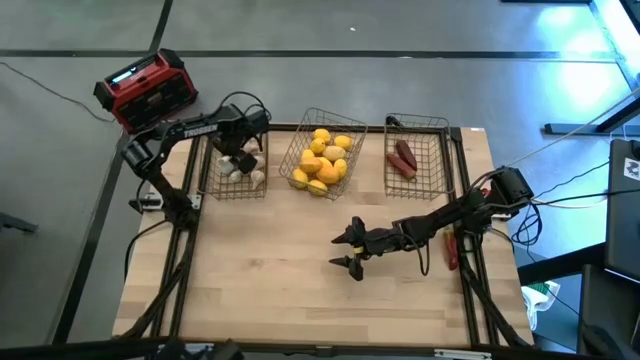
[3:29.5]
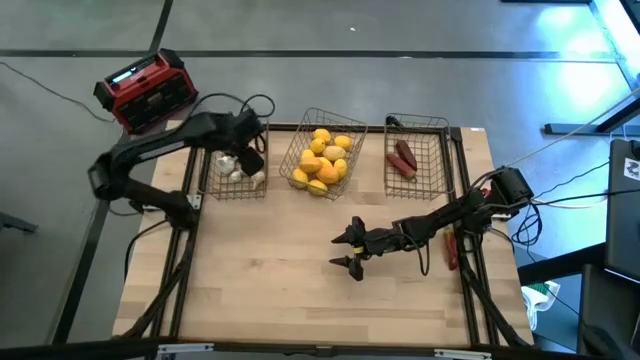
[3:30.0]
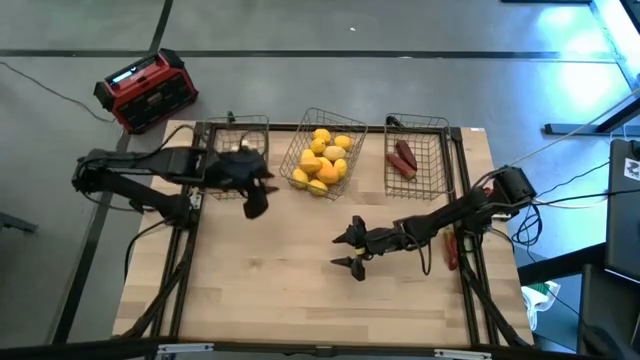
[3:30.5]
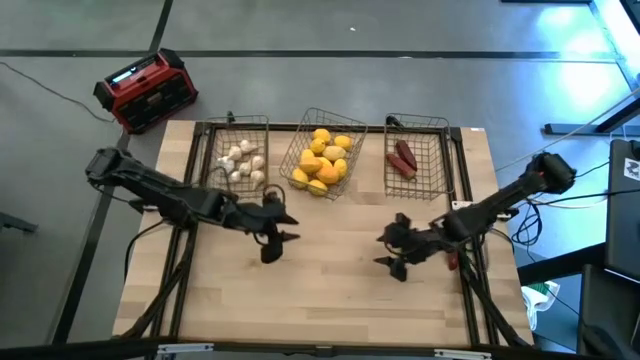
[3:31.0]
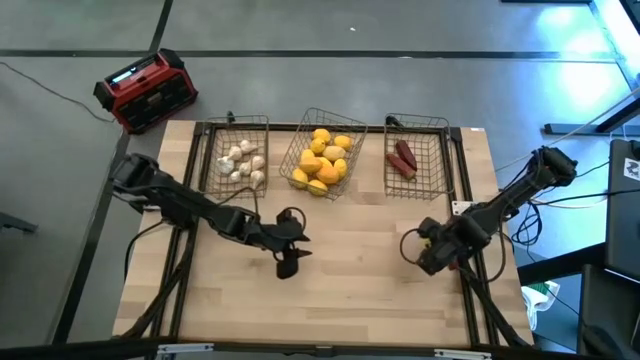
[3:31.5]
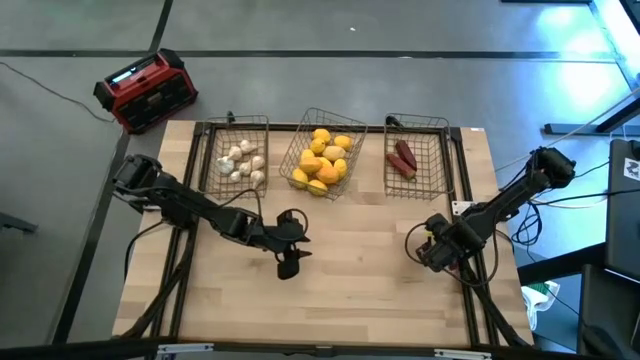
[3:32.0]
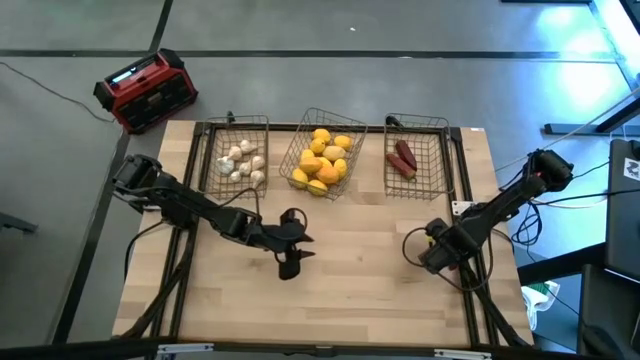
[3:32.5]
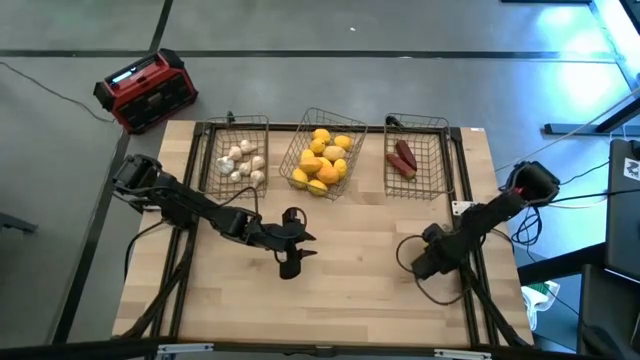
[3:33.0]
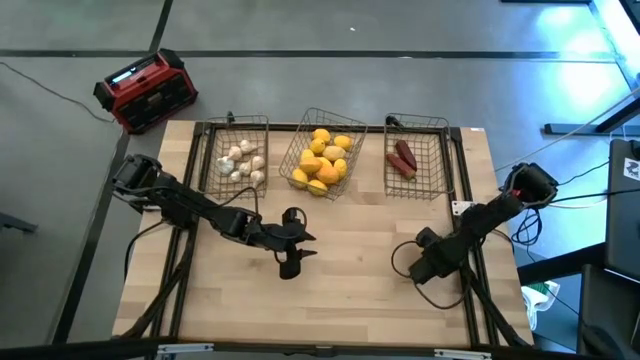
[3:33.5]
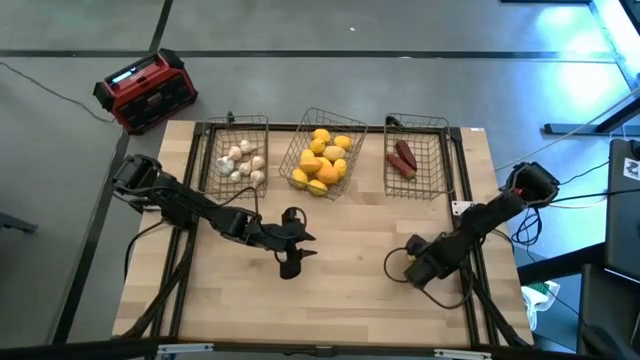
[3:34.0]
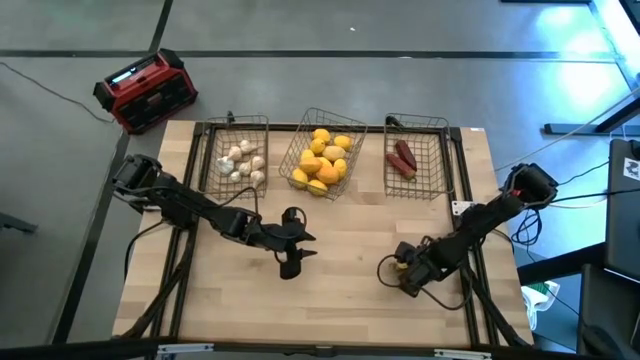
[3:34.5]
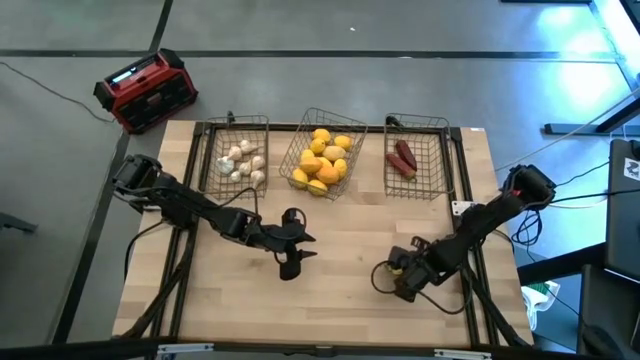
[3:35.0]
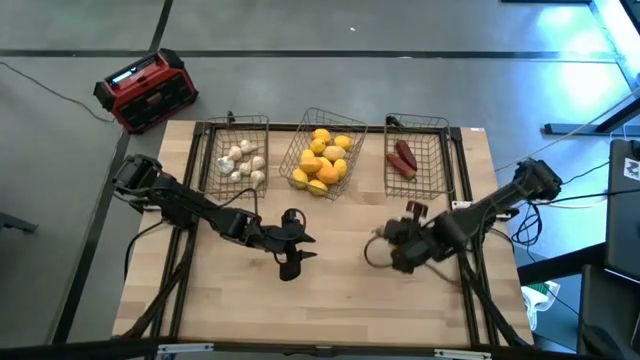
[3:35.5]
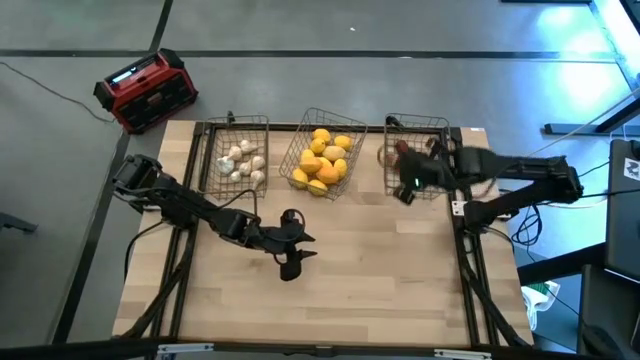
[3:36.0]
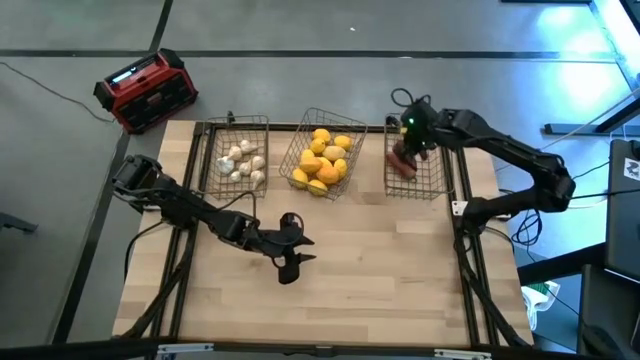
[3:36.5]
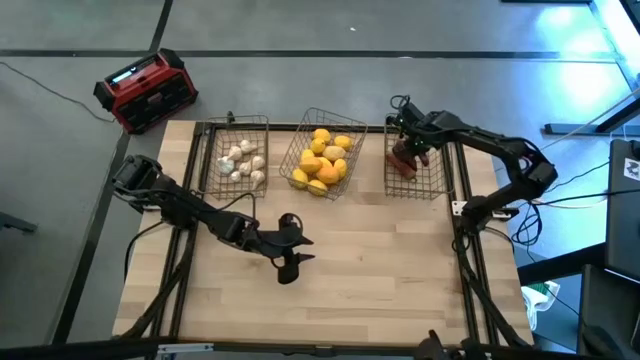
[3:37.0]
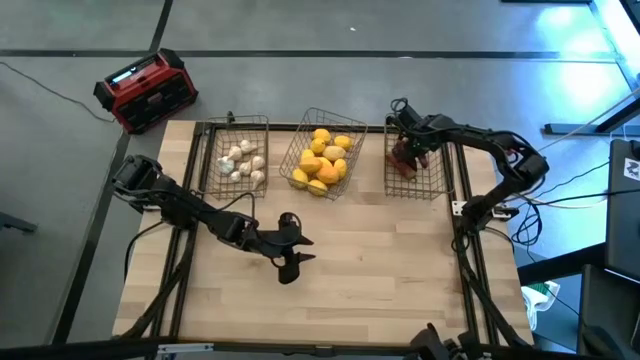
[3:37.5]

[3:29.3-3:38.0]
Task: Sort produce into baskets
Put the bell pepper into the right wire basket

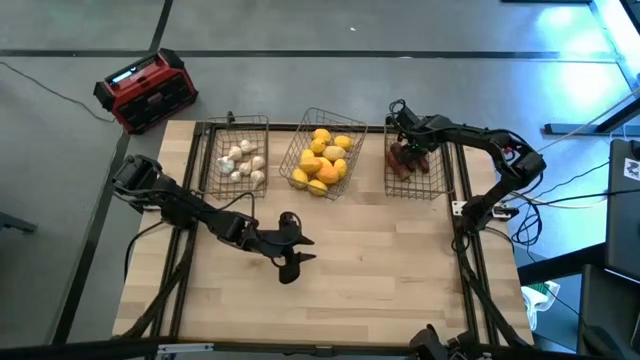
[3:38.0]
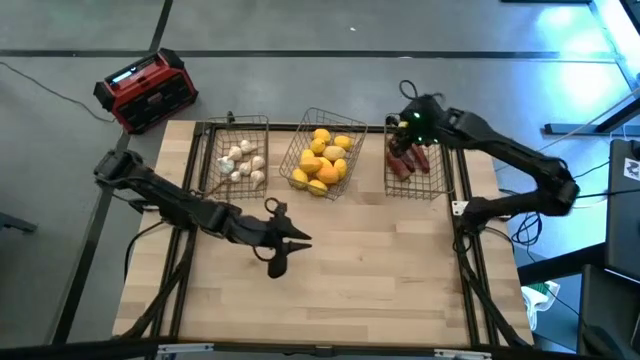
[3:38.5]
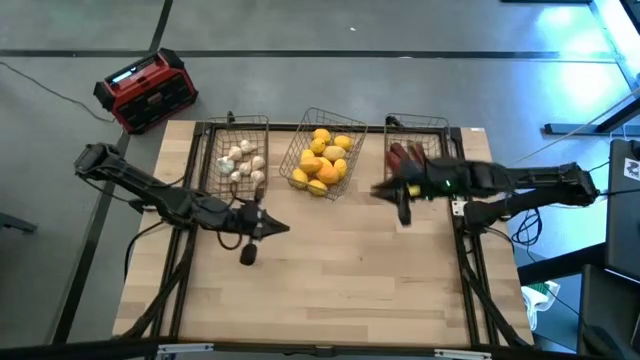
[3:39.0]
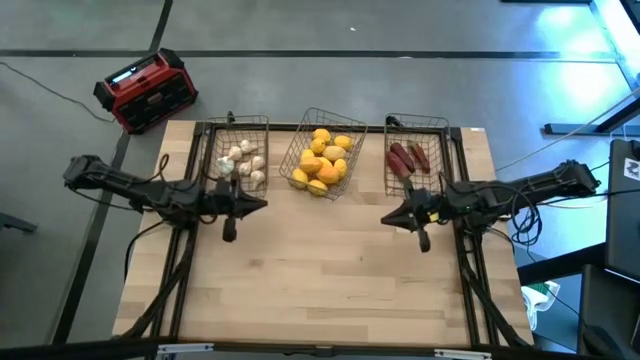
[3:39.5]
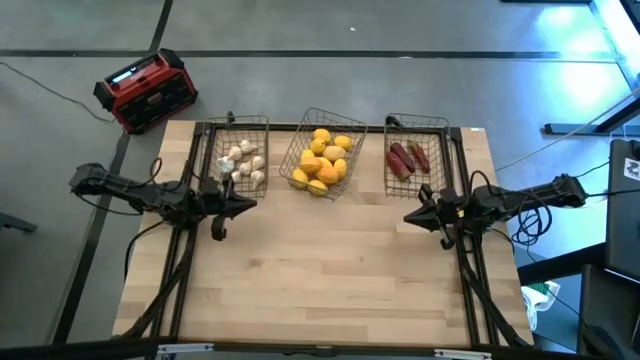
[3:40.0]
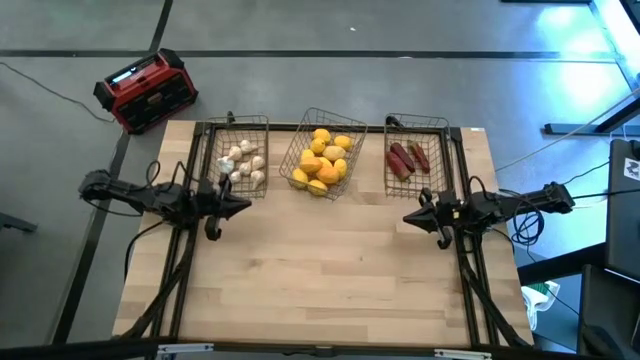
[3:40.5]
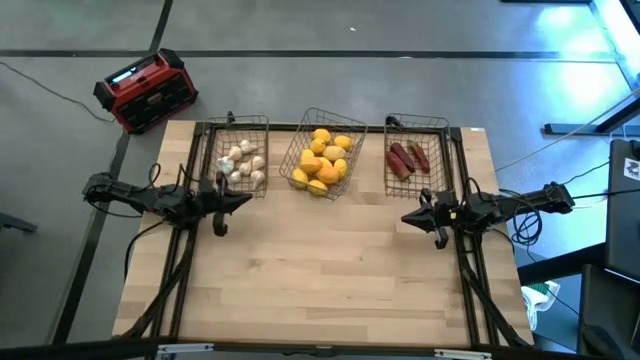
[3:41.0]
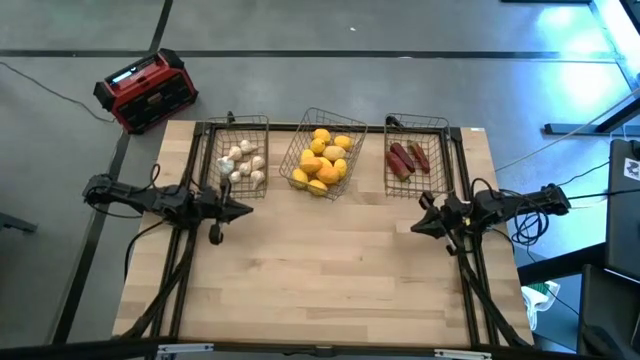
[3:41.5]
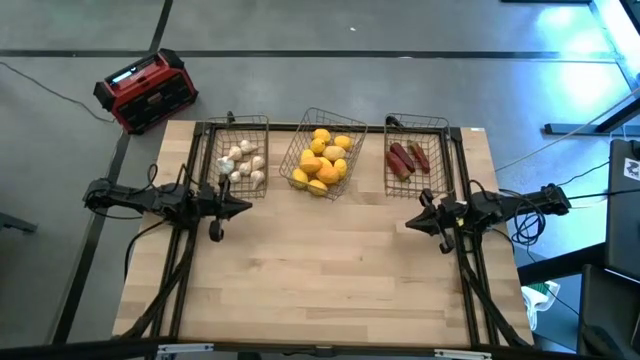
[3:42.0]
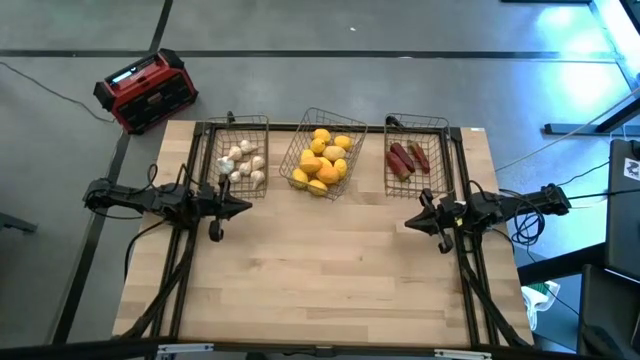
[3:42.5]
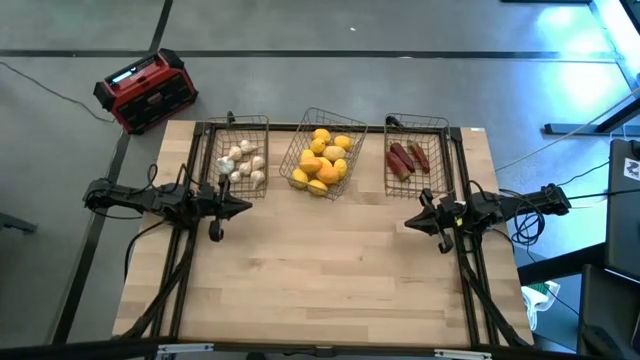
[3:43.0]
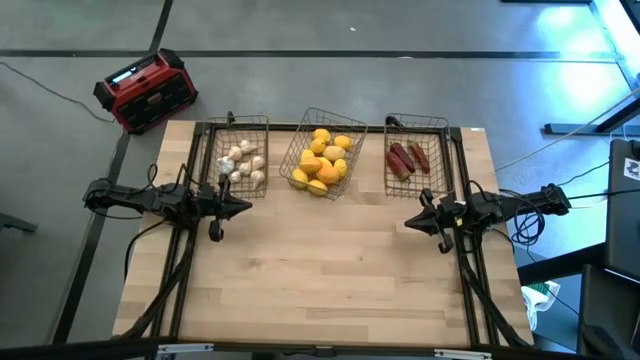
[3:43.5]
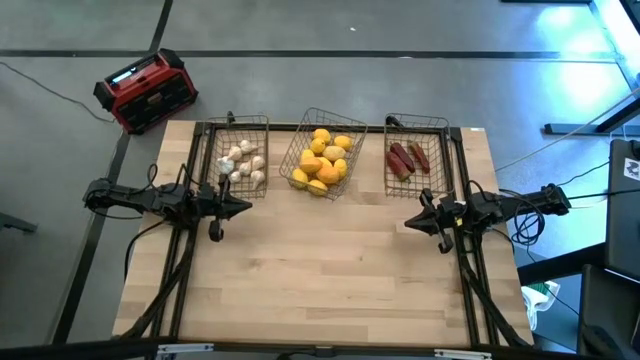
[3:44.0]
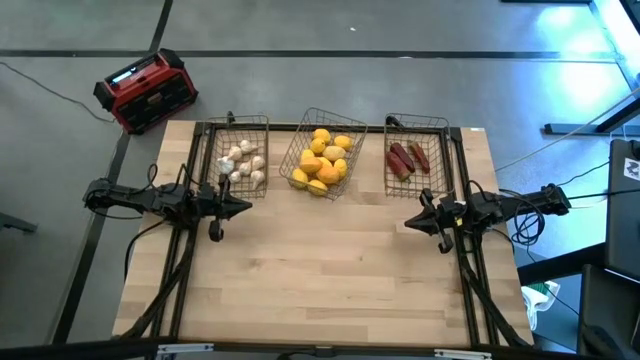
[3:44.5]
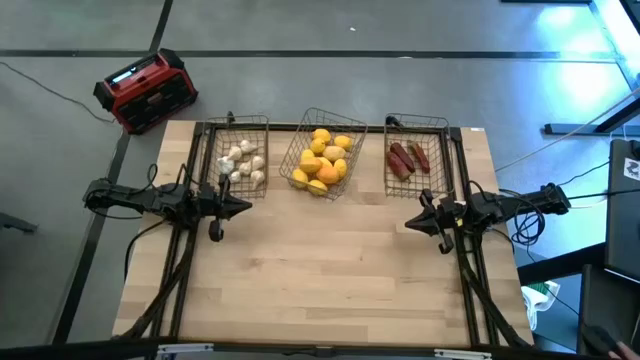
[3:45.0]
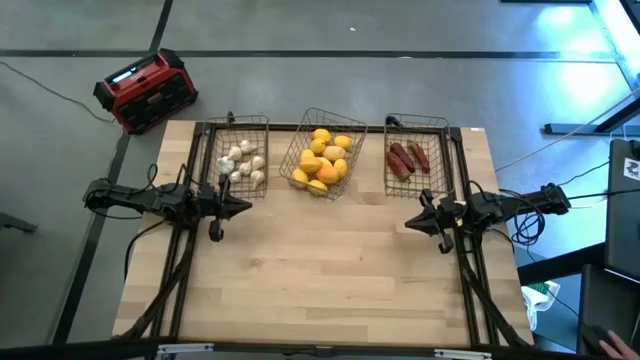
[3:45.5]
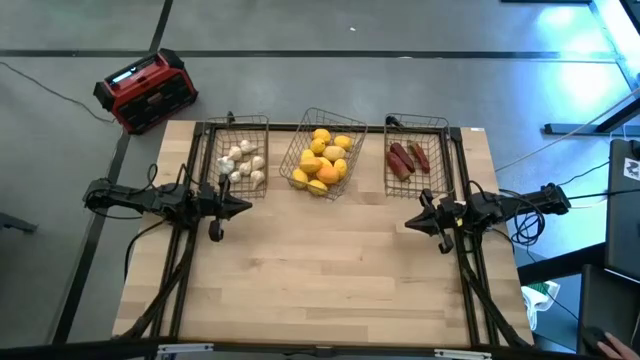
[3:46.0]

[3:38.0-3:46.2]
Return to Home Position

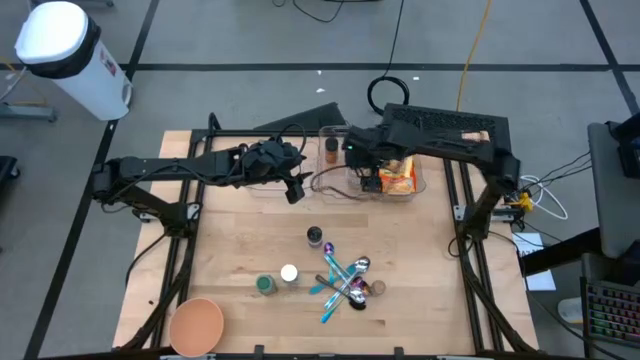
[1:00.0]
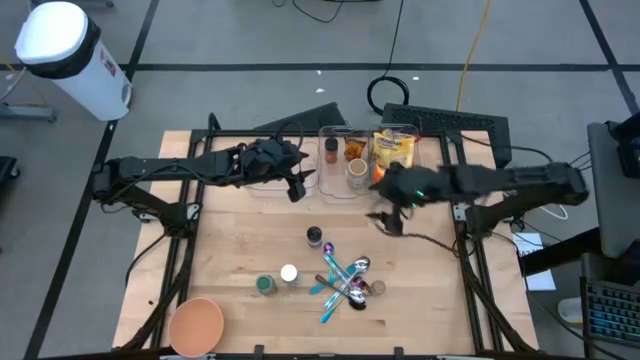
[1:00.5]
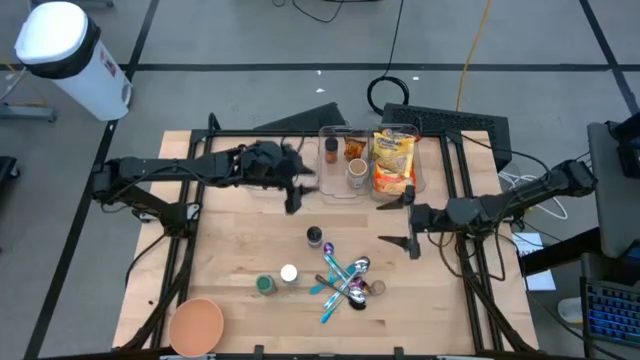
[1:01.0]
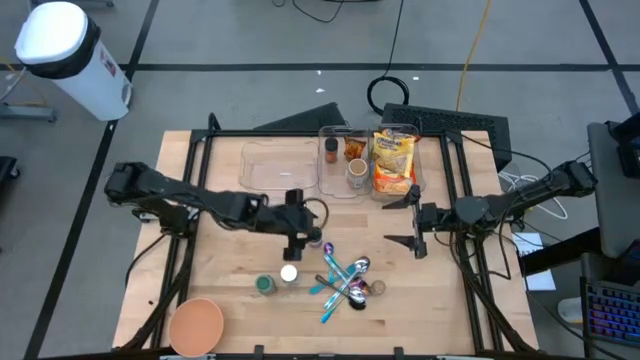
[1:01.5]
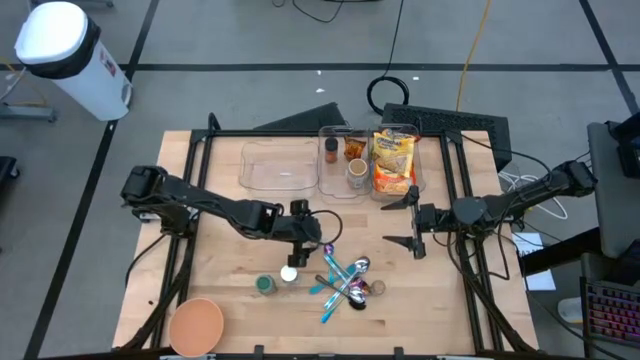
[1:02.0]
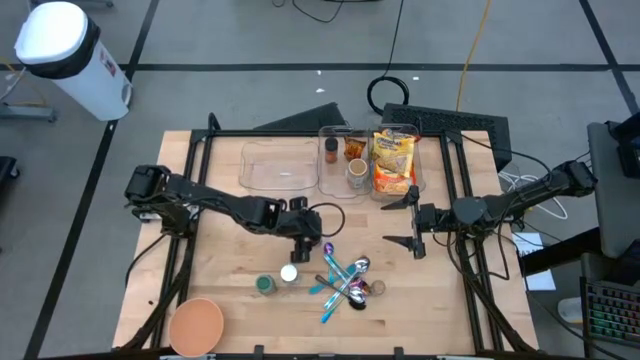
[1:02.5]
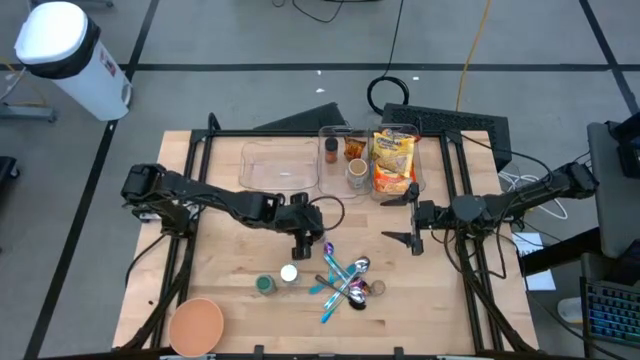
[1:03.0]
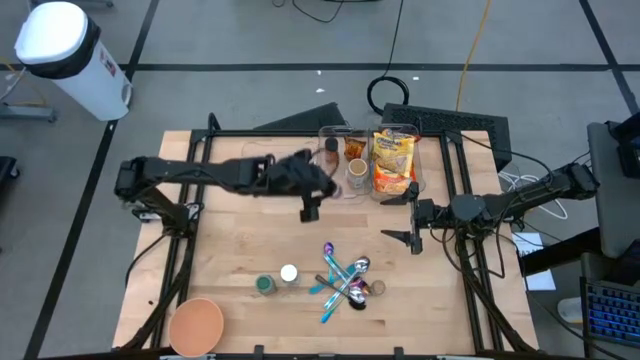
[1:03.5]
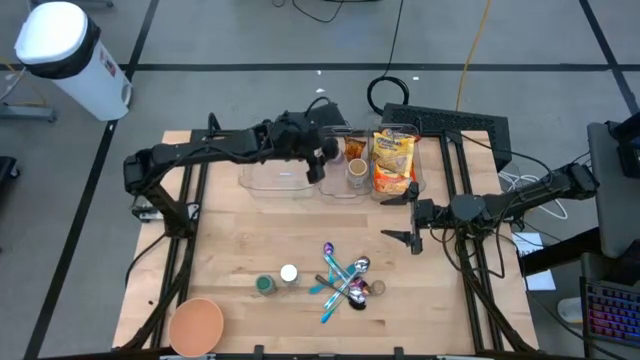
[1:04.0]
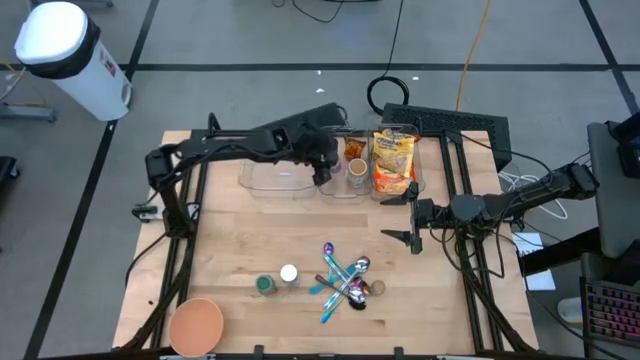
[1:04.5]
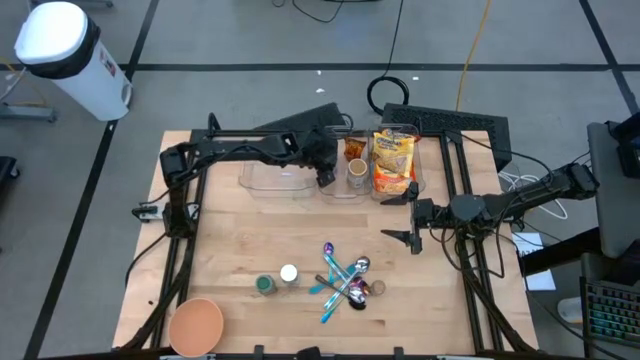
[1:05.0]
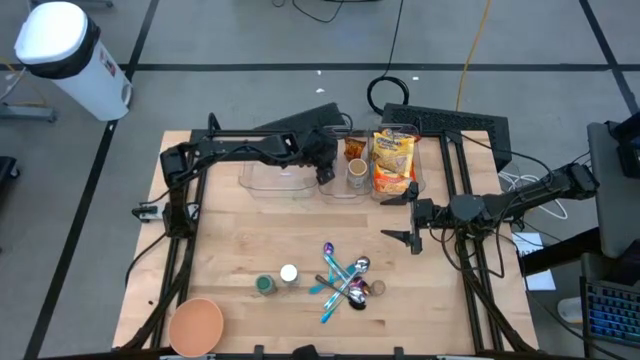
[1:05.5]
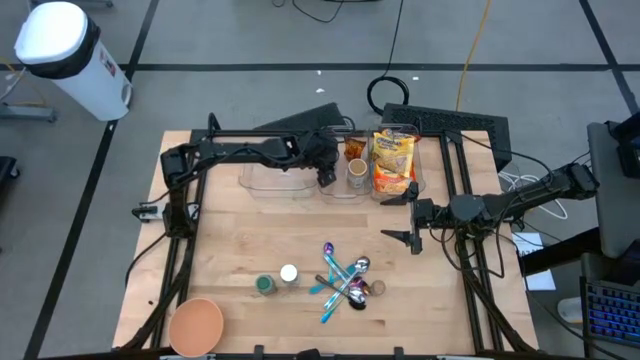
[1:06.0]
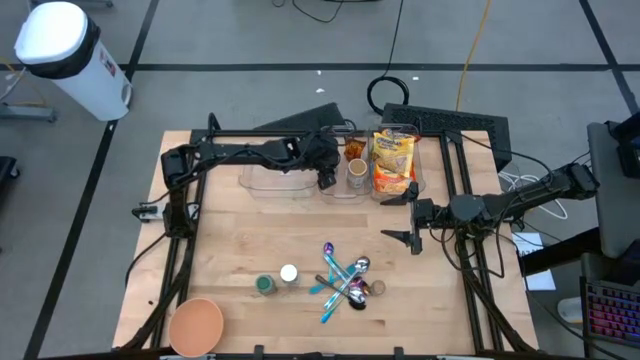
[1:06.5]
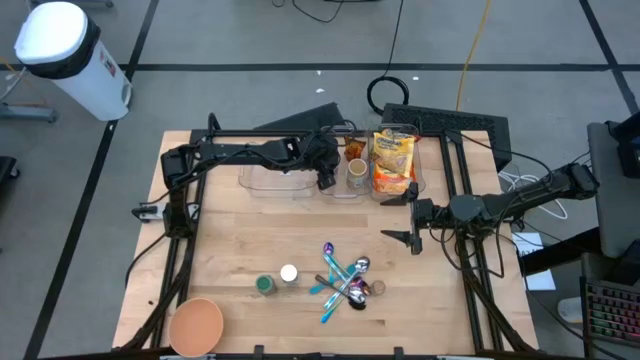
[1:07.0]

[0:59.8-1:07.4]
Task: Pick & Place Food Item
Put the violet seasoning bottle into the middle transparent bin
